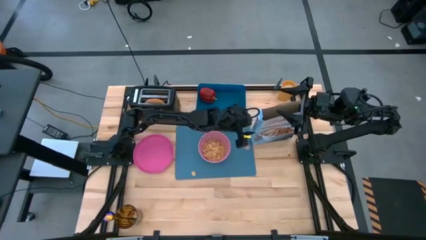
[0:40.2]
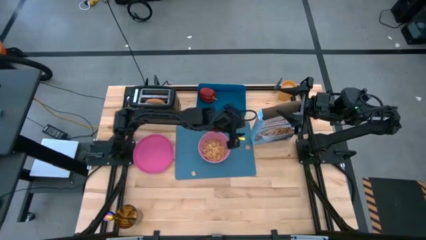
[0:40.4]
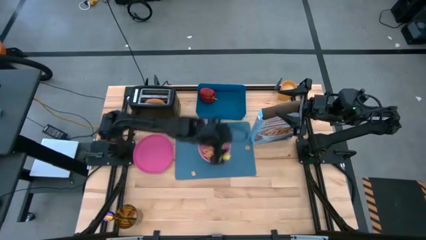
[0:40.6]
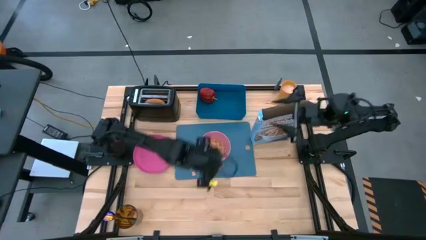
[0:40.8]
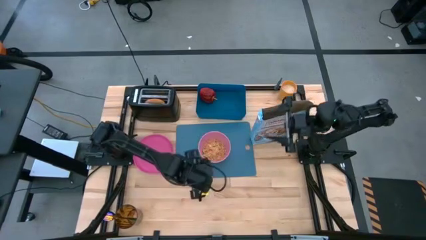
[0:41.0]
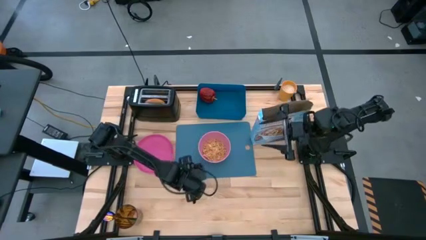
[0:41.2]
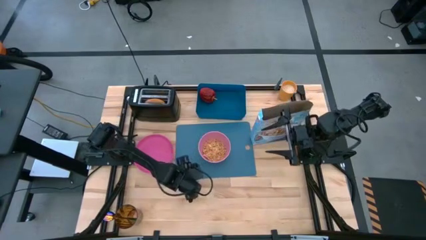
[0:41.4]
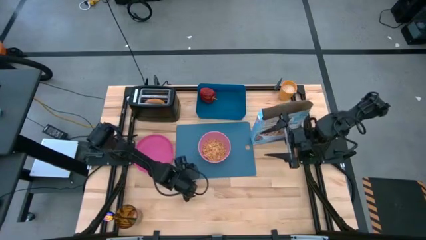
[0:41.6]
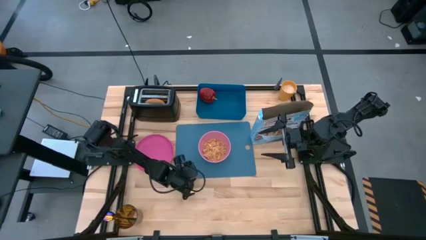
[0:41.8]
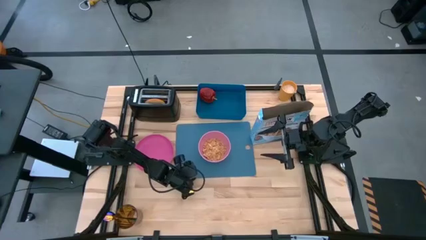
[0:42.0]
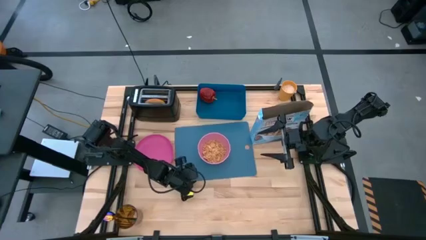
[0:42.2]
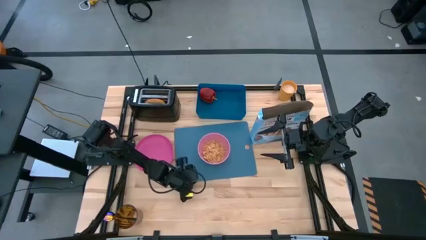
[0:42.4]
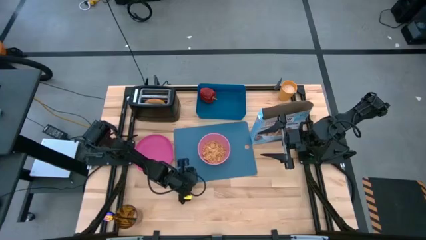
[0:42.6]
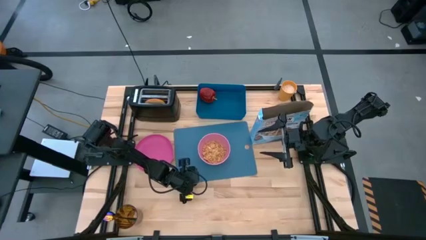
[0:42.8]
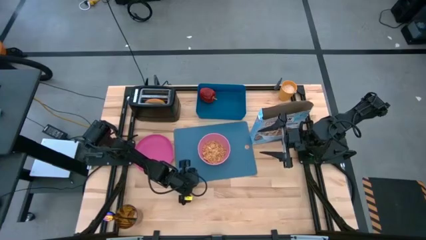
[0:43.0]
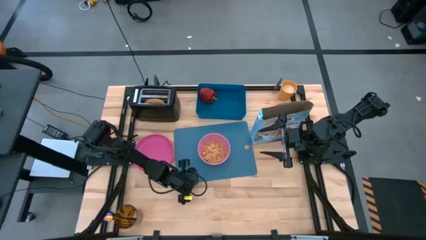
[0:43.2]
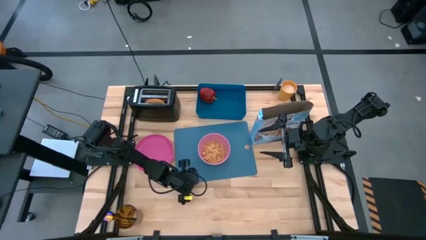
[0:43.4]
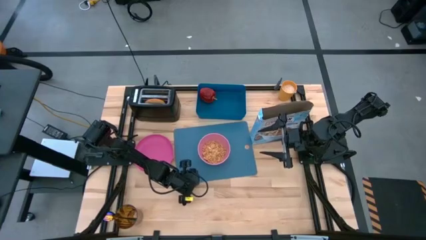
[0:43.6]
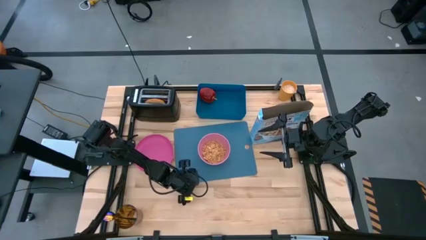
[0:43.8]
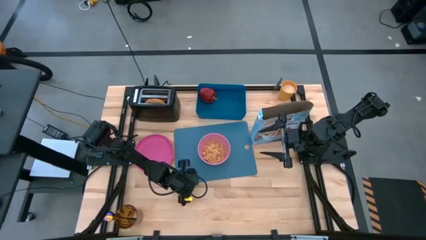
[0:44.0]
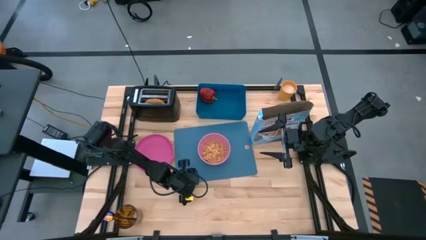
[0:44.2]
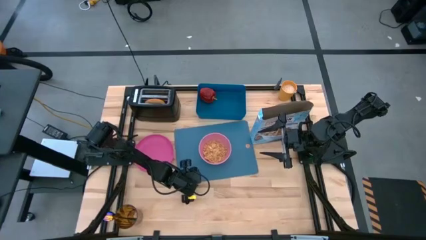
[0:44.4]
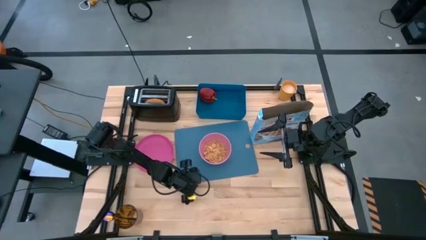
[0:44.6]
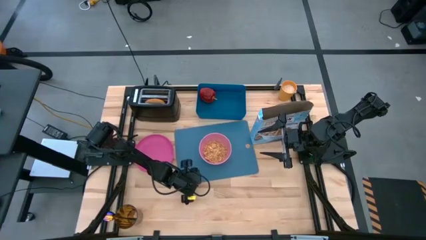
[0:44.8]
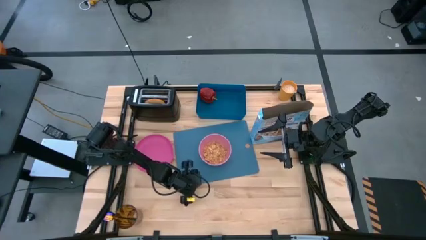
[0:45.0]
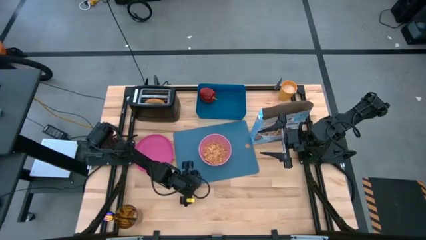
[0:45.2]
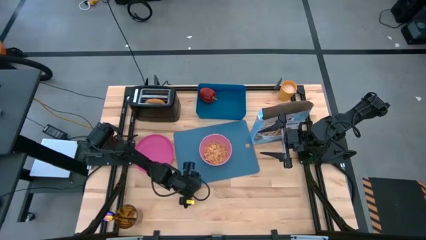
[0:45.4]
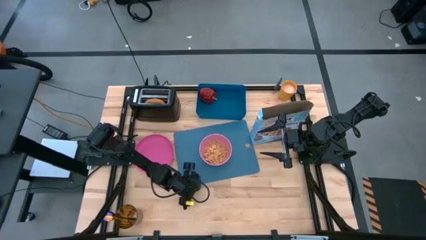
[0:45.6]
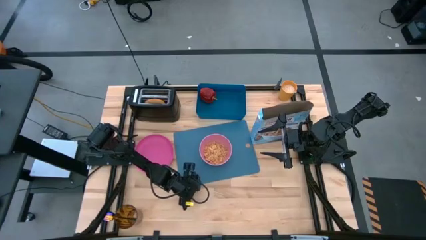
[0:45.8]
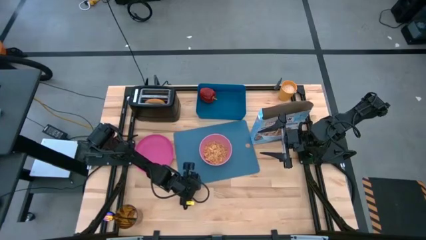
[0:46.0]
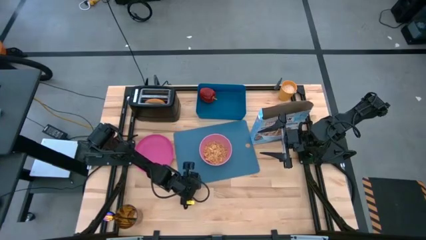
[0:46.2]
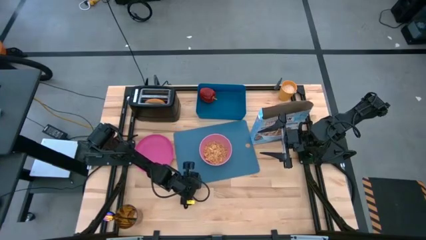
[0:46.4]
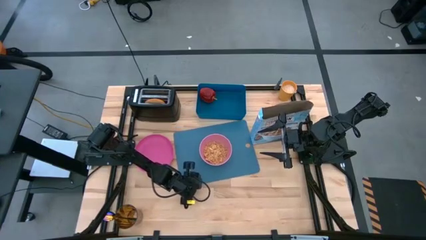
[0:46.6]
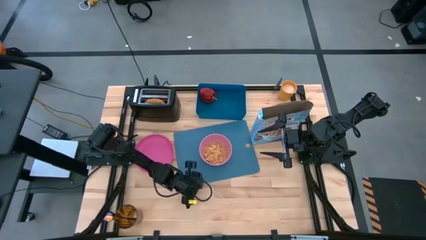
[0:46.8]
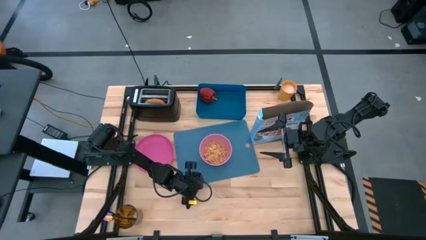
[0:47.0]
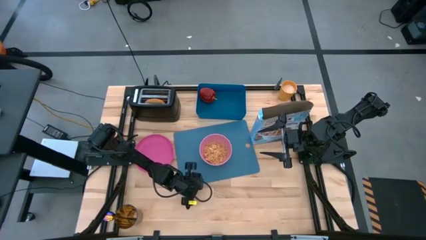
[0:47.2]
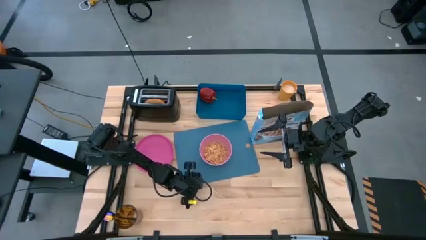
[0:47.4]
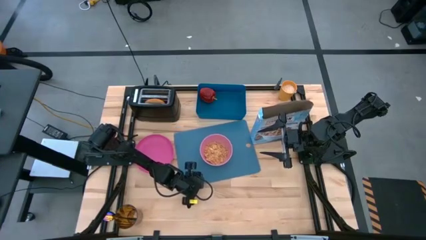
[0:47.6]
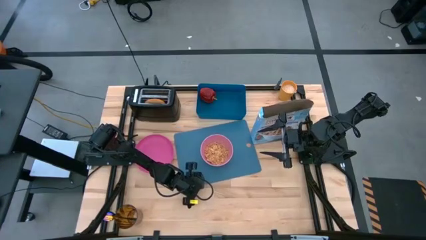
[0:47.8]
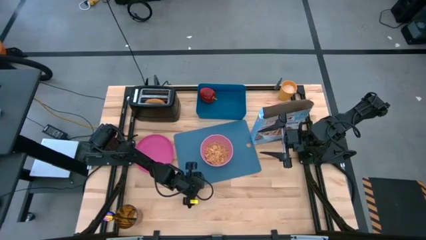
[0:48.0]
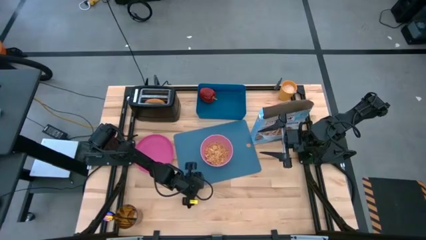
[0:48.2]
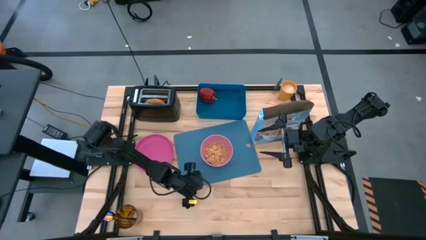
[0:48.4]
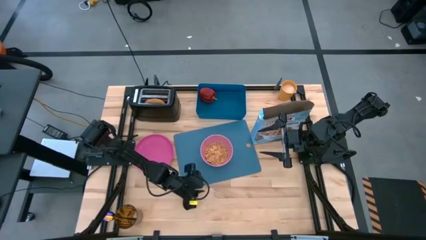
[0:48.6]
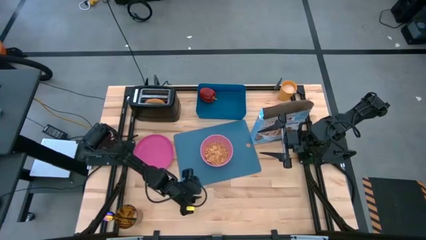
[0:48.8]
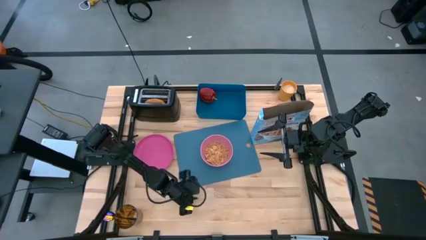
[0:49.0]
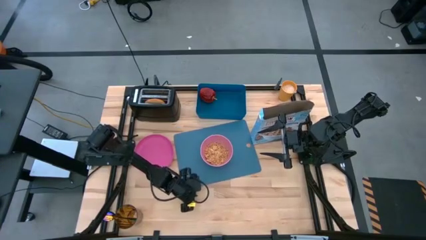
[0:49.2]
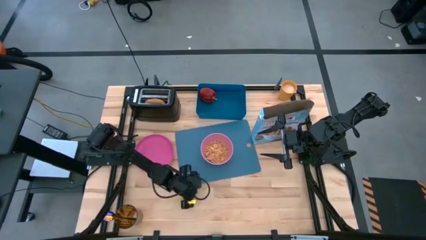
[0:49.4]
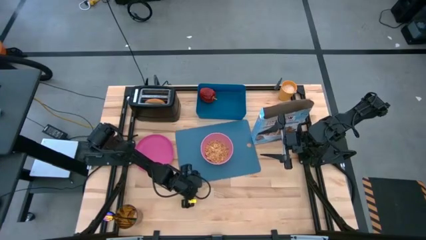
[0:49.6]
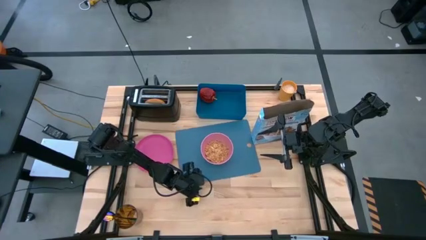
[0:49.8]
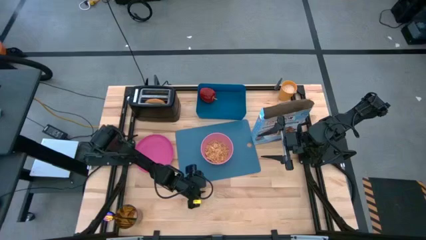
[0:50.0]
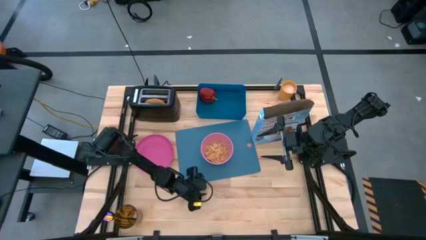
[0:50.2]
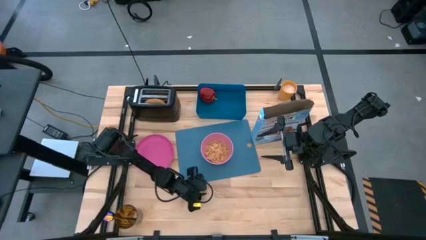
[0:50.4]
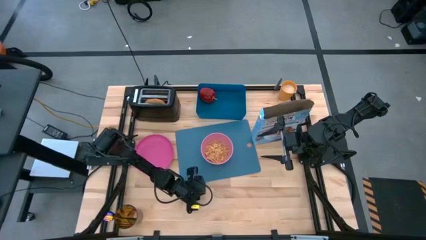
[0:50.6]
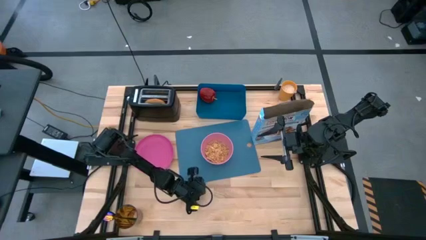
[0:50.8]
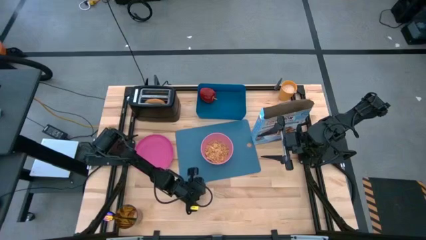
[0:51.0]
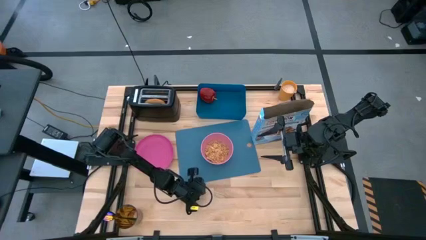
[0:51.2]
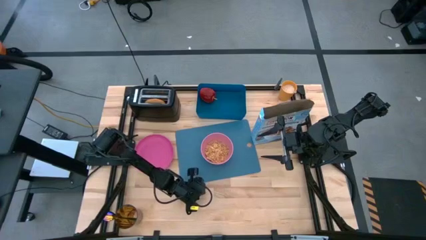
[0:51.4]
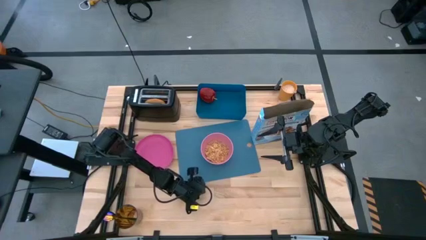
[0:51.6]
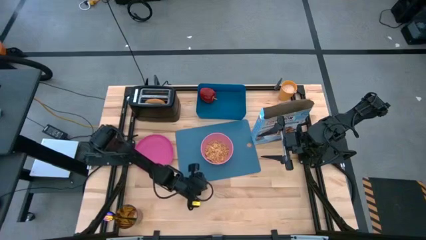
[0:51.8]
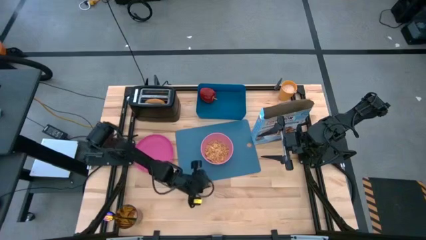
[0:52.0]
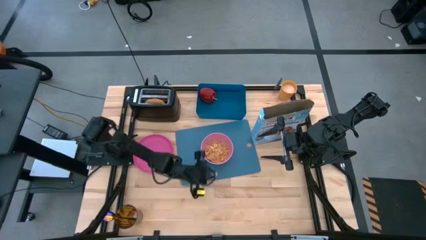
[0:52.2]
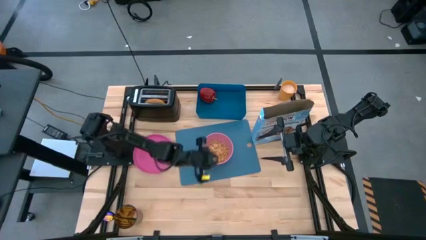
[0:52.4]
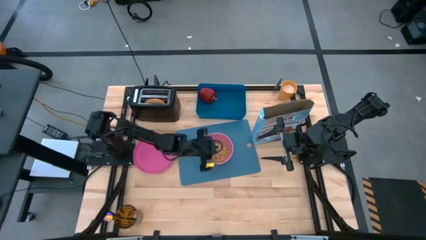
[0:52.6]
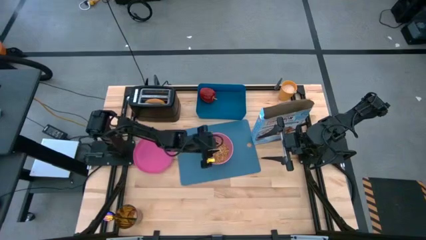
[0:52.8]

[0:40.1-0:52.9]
Task: Arrange a breakfast setting
Put the one piece of cereal into the pink bowl

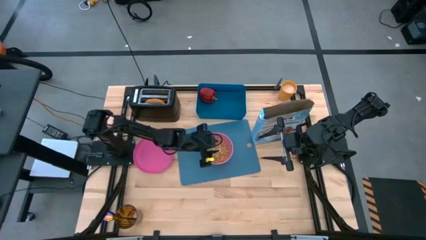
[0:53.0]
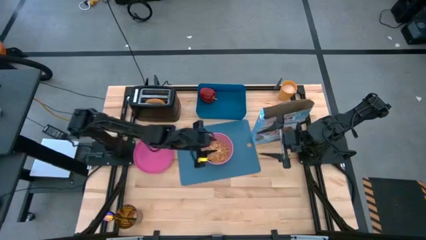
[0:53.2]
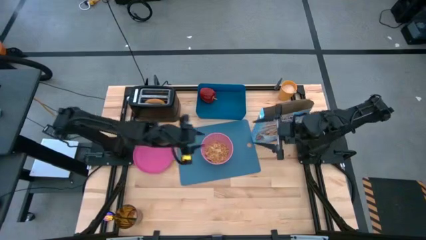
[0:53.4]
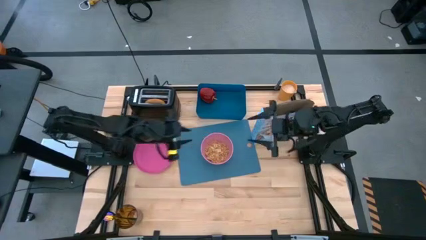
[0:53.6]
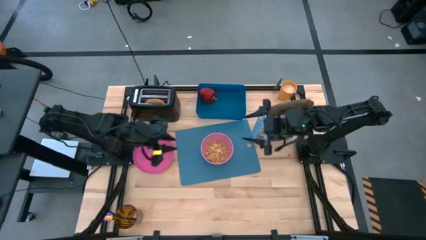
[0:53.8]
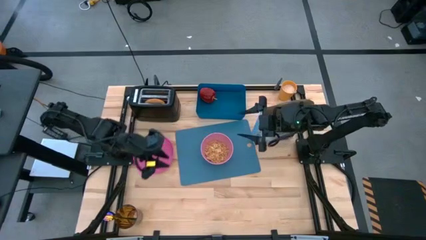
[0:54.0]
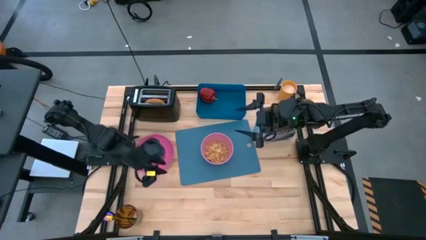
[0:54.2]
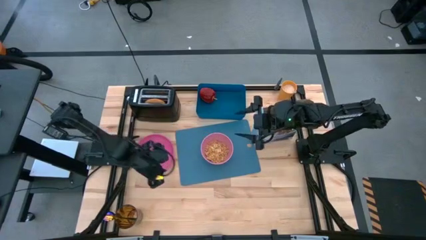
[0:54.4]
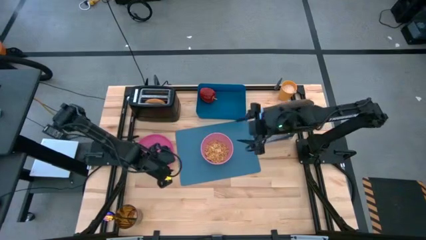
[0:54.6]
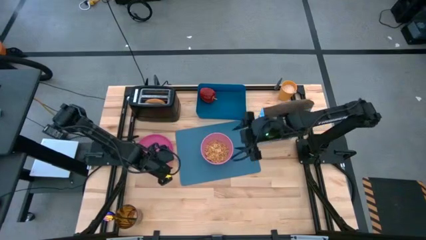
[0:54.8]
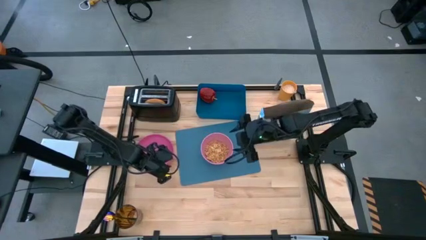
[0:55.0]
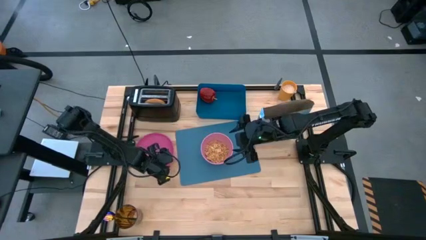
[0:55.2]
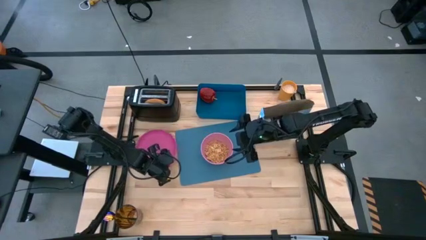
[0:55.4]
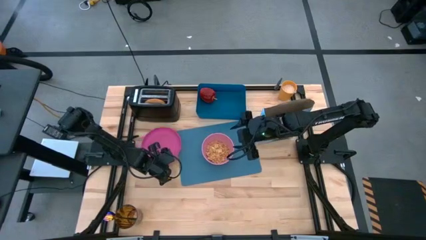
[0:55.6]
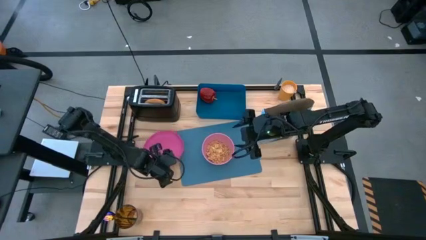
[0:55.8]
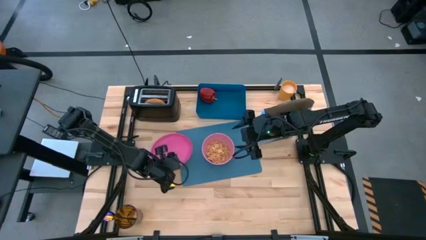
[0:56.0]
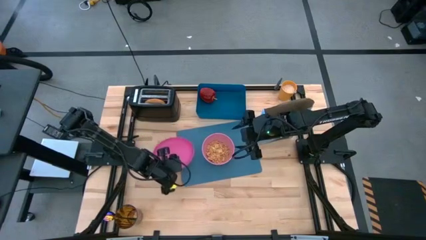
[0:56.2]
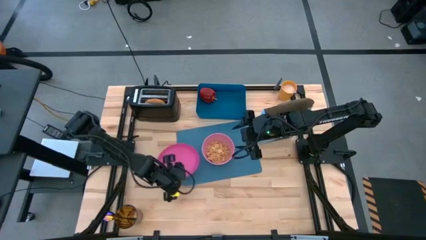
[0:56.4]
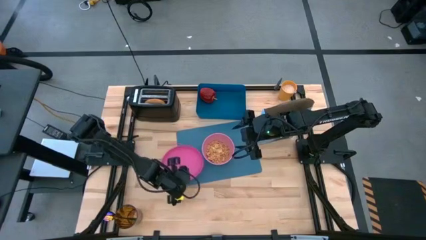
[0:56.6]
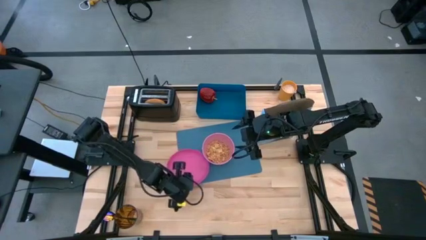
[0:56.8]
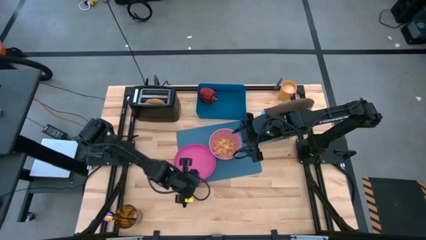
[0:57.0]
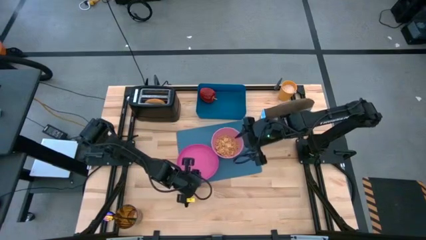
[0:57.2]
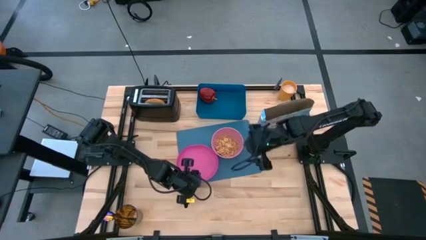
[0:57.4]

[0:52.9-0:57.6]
Put the plate on the blue placemat
